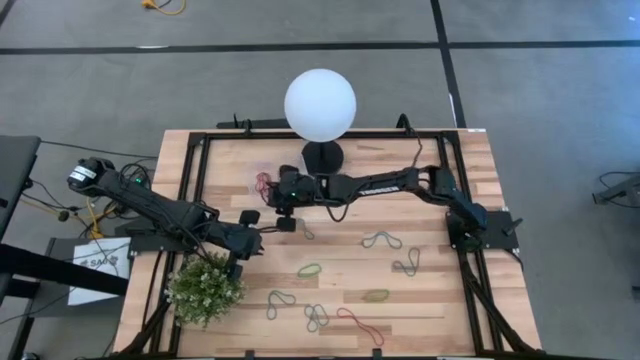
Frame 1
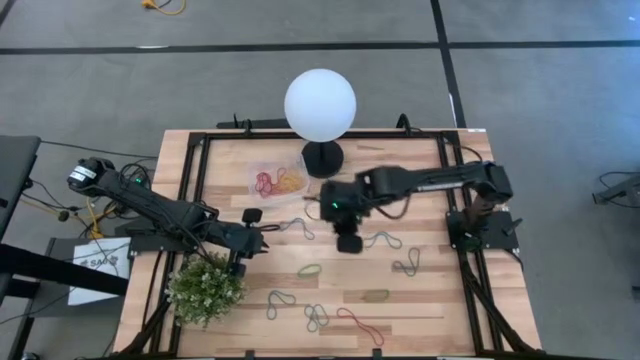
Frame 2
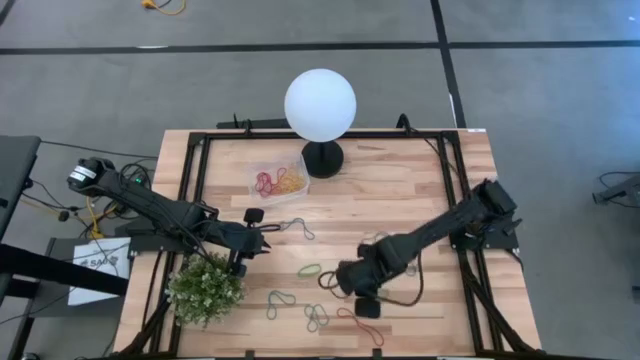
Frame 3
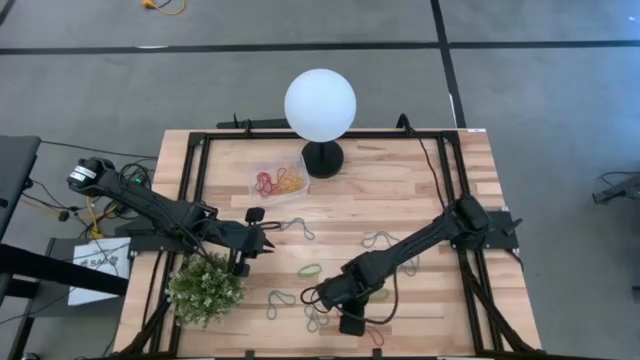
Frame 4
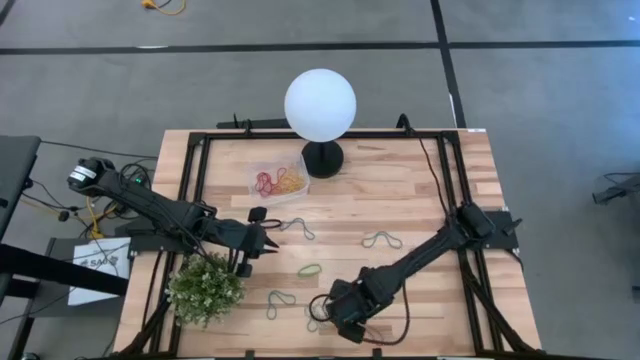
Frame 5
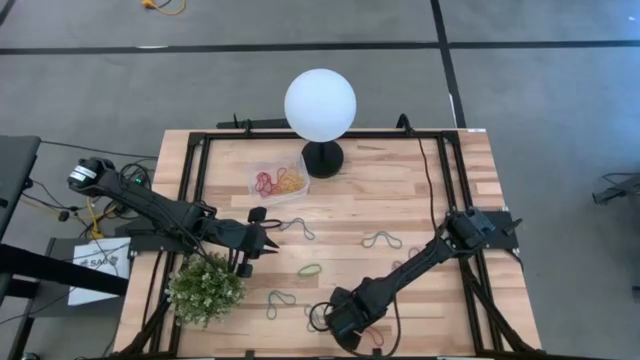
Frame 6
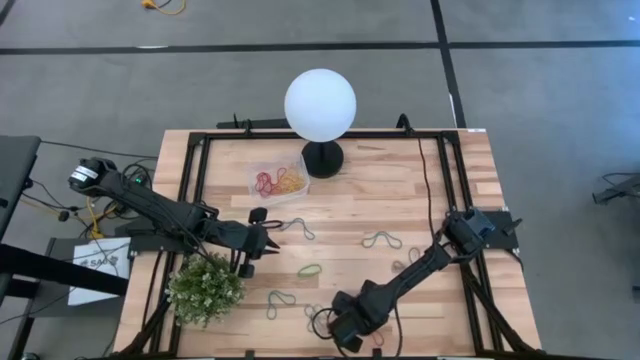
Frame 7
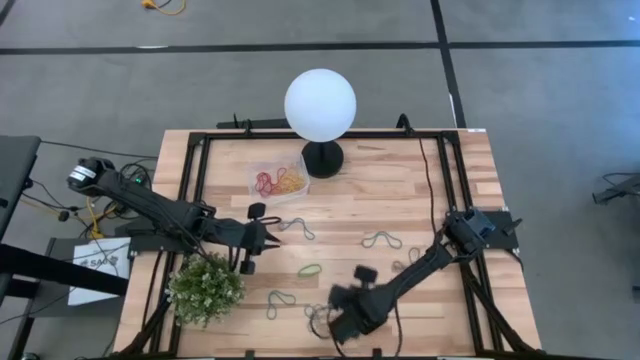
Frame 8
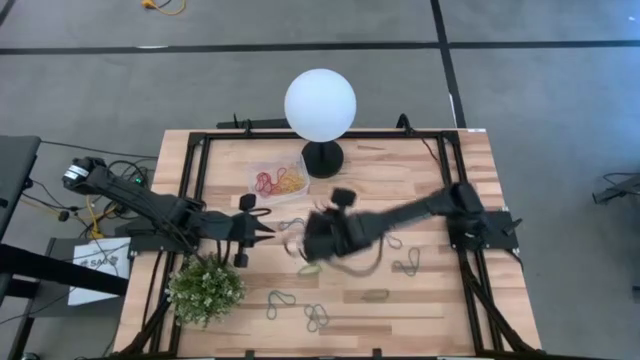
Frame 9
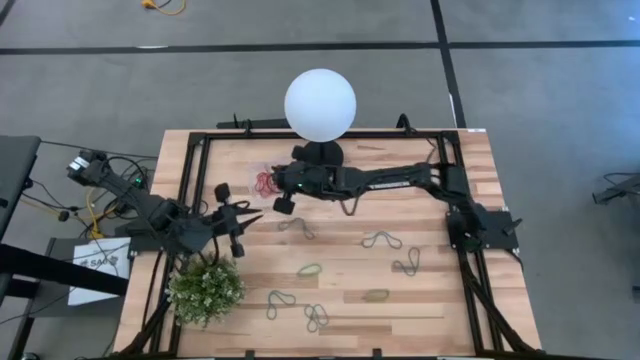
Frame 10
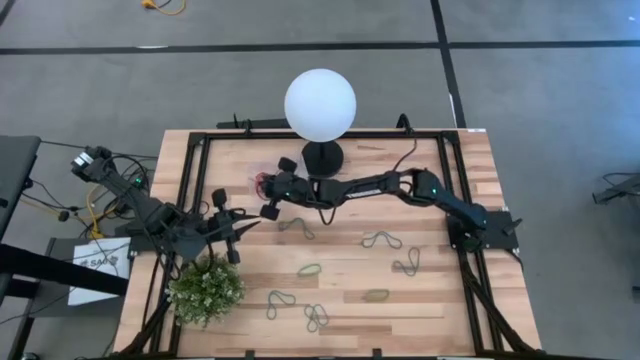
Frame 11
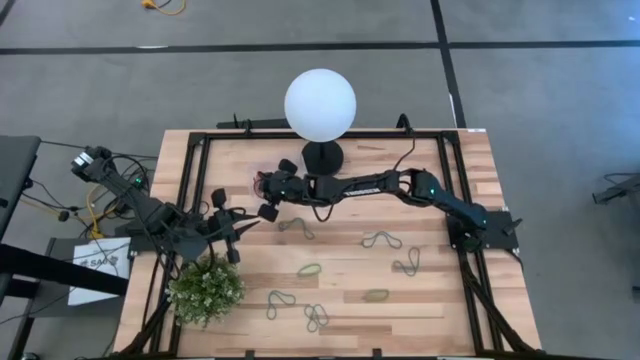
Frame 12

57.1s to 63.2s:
Task: Pick and place items into bin
Put the red rubber band into the transparent bin

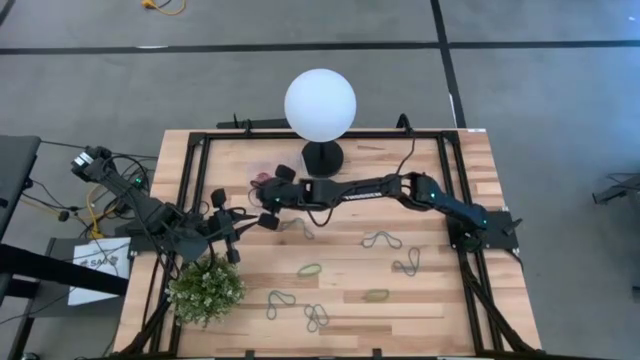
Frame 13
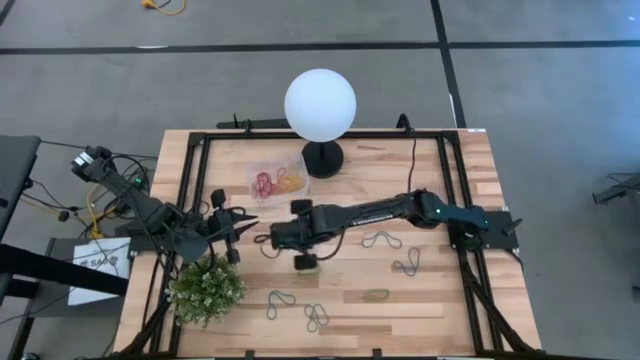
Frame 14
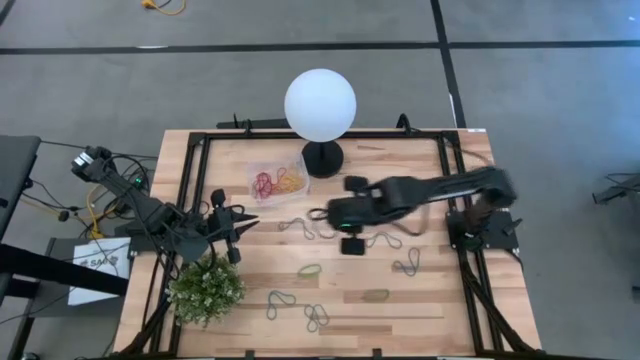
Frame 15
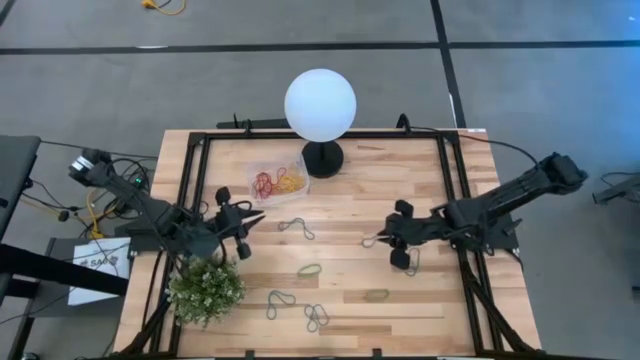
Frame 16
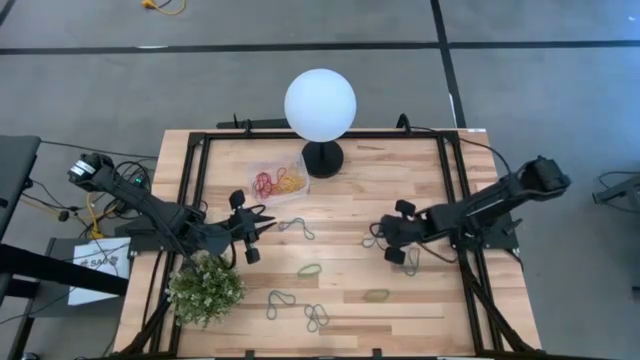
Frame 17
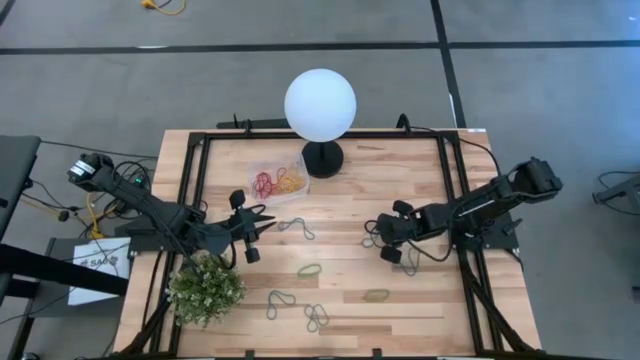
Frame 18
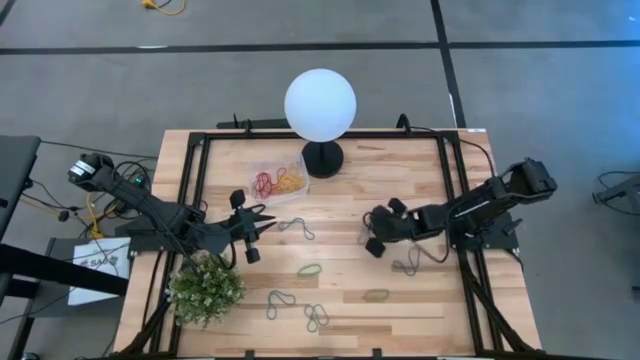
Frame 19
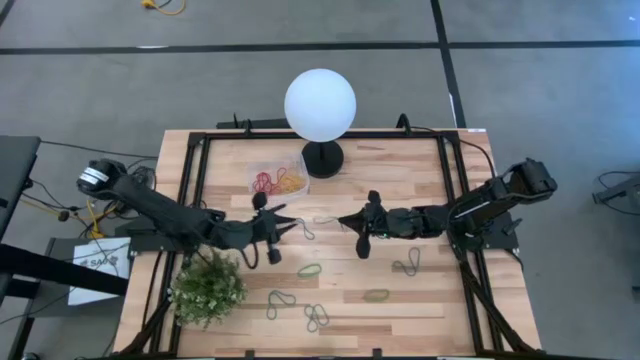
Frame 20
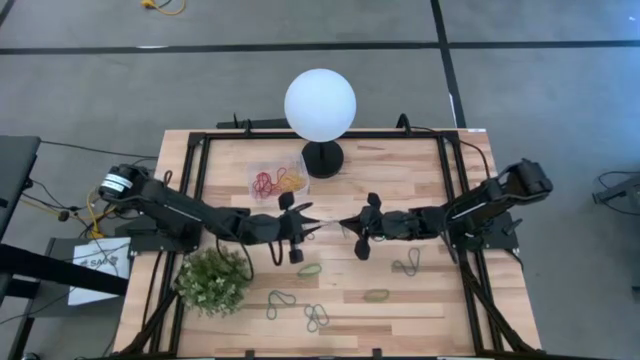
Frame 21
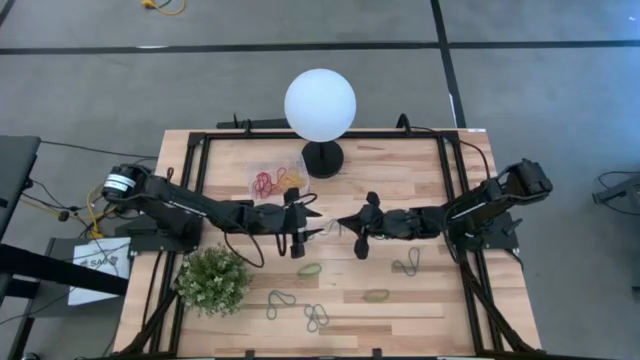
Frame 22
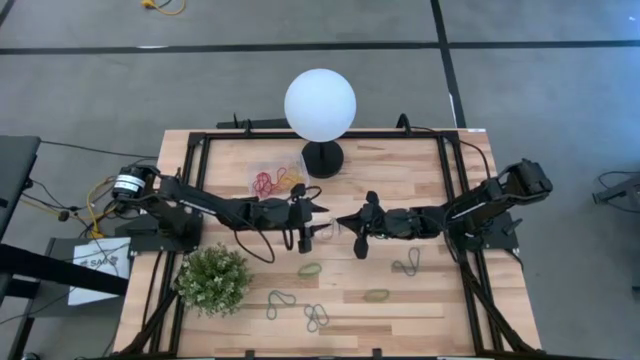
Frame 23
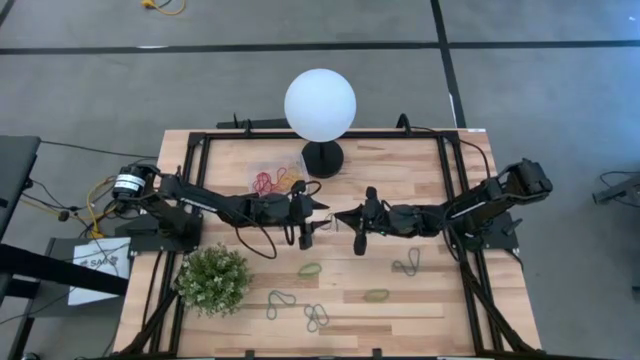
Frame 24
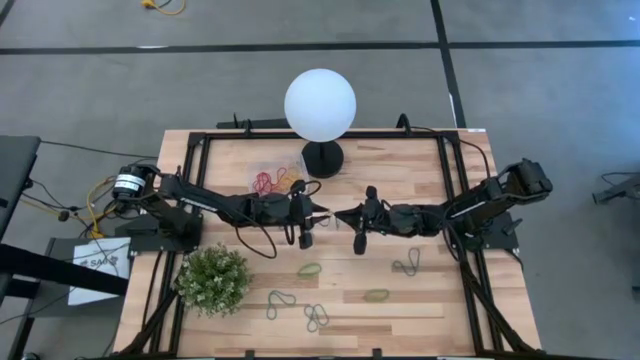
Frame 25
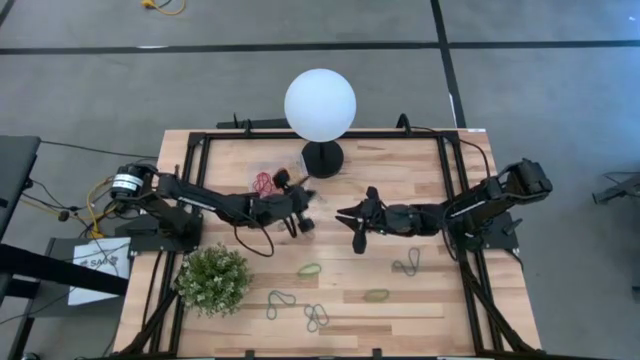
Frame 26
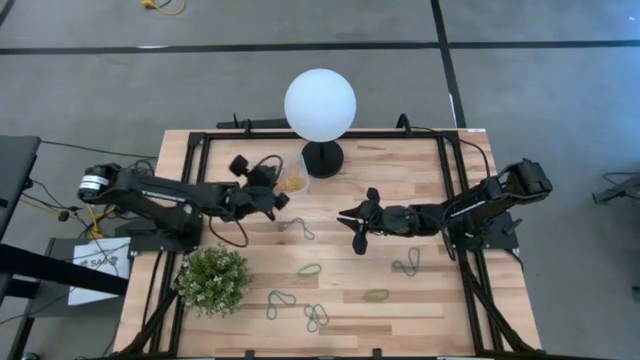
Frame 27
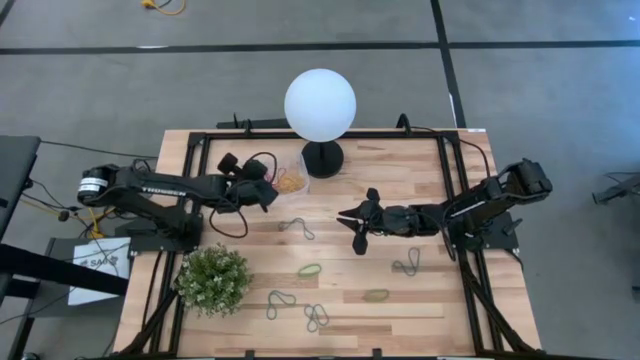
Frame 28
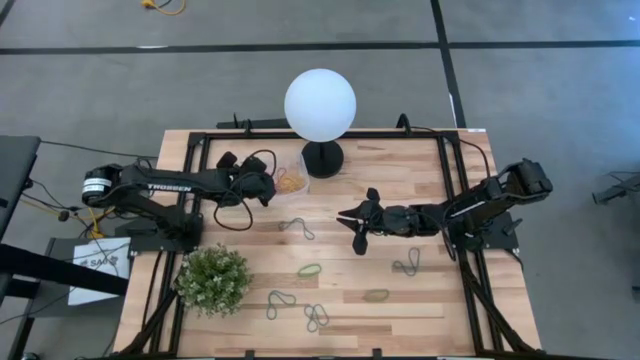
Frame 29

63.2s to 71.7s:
Put the blue rubber band into the transparent bin

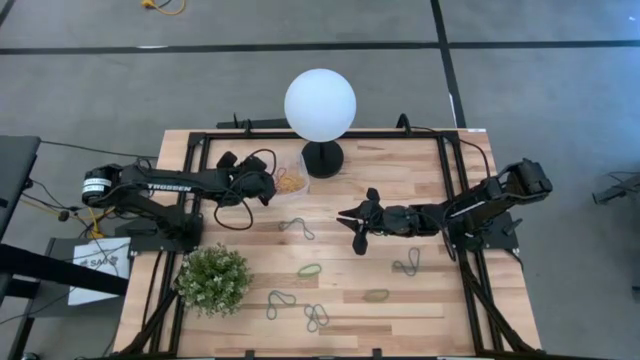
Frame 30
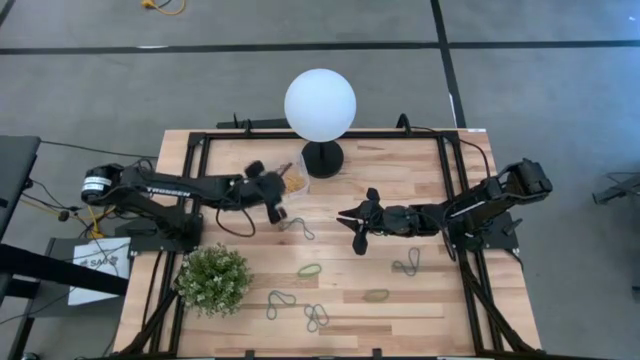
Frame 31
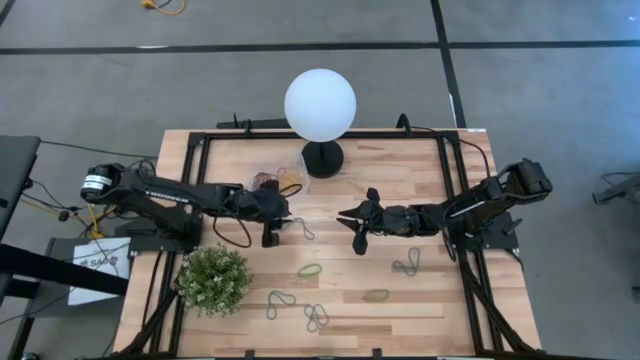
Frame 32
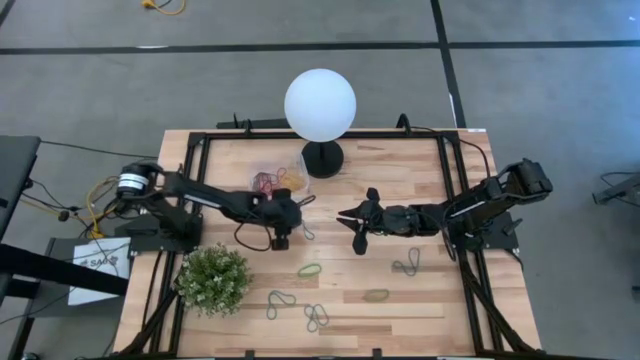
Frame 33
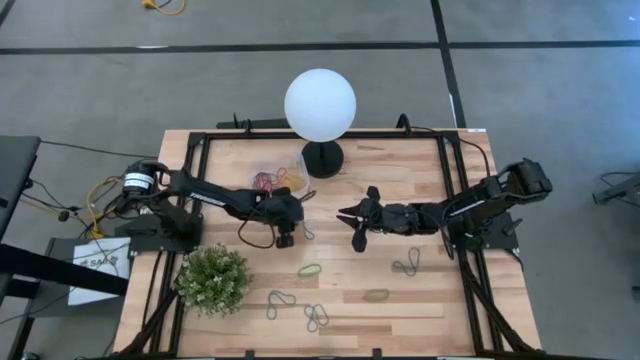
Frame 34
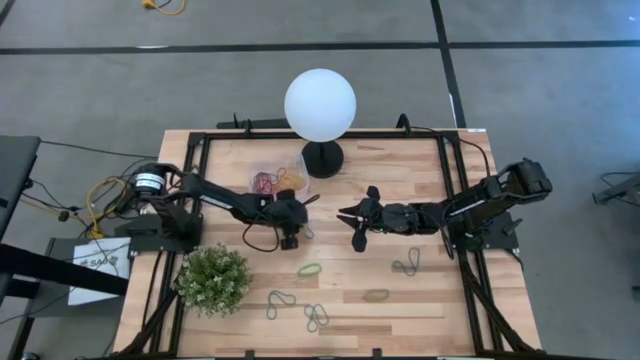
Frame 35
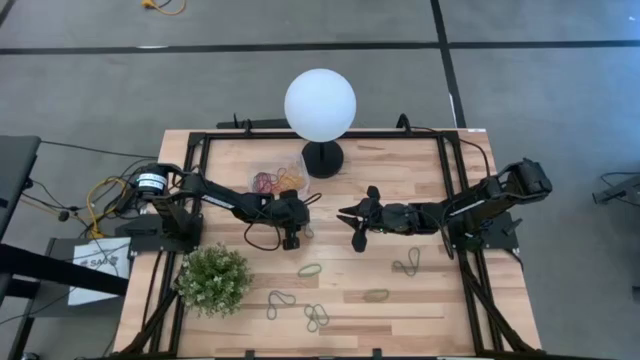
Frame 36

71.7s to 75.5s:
Put the blue rubber band into the transparent bin

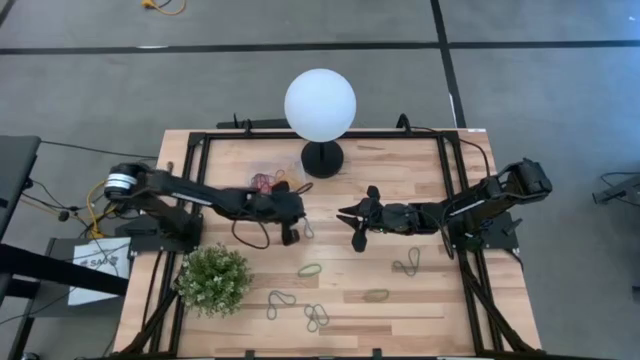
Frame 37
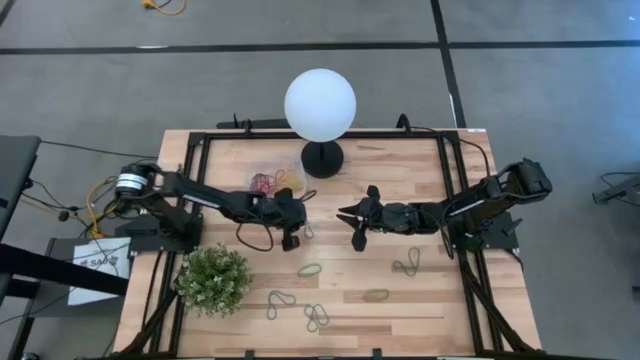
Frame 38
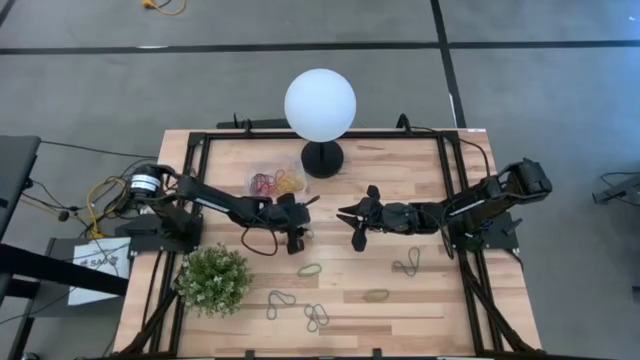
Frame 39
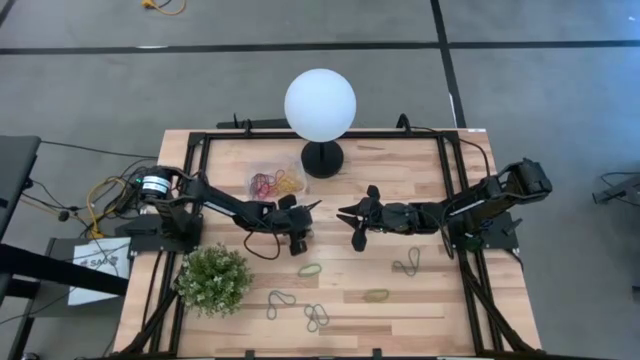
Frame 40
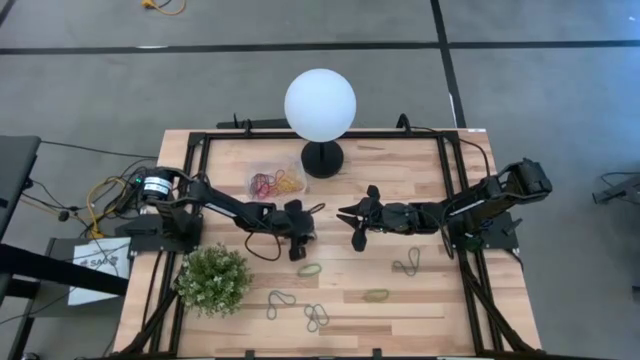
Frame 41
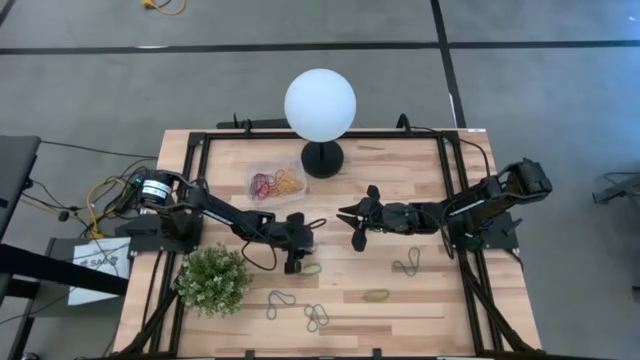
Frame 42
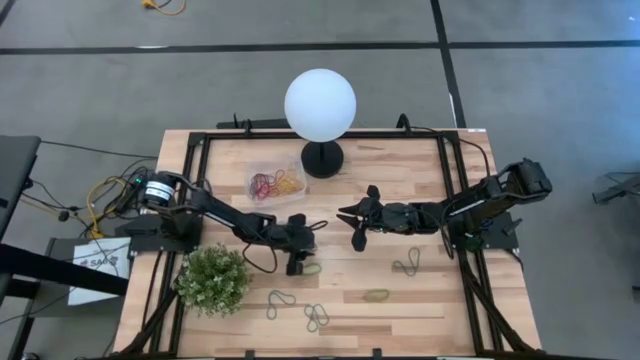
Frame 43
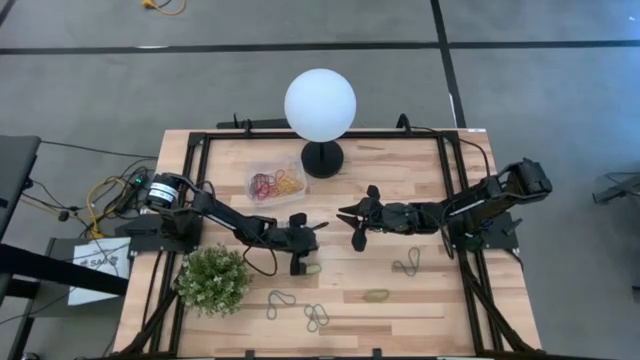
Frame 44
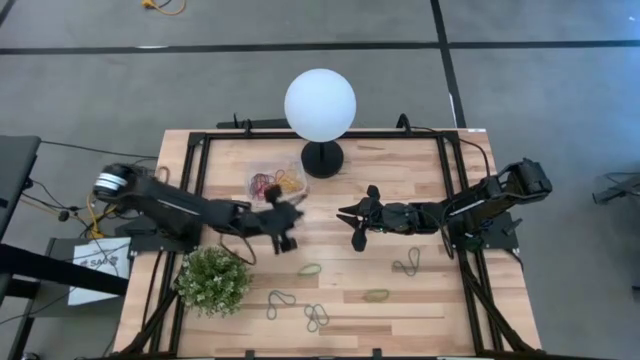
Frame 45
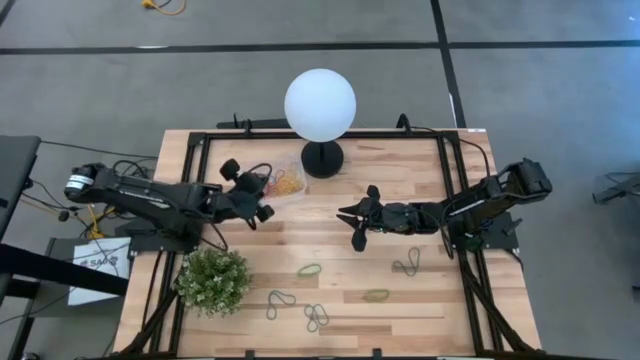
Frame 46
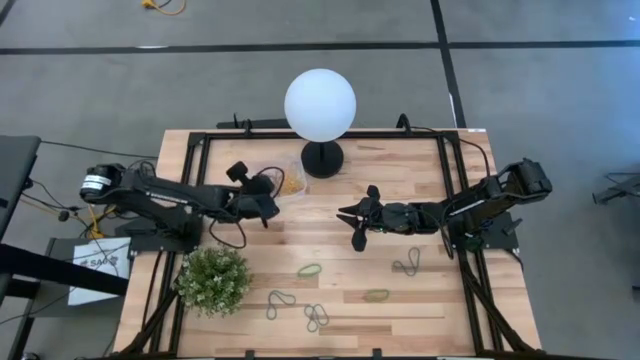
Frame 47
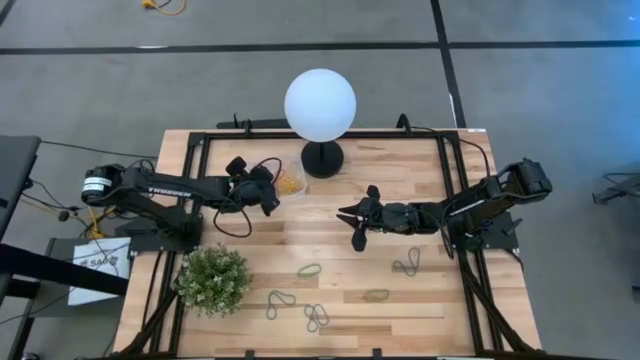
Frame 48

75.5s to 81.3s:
Put the blue rubber band into the transparent bin
